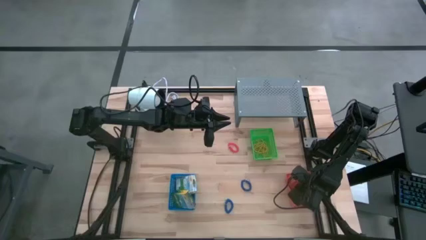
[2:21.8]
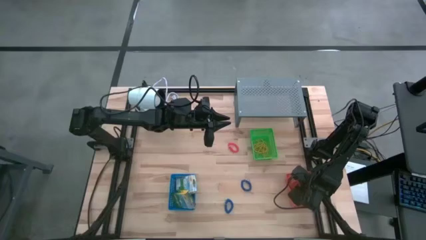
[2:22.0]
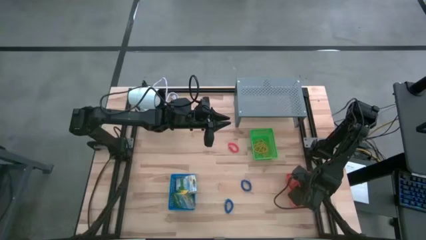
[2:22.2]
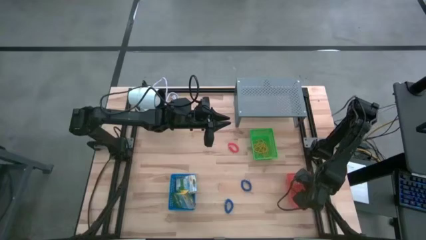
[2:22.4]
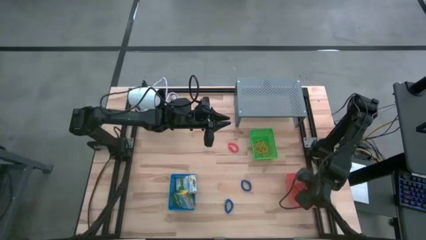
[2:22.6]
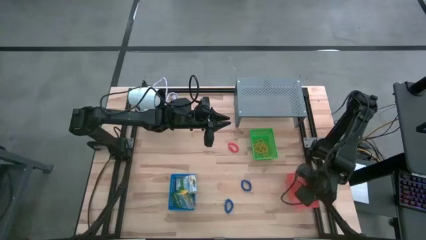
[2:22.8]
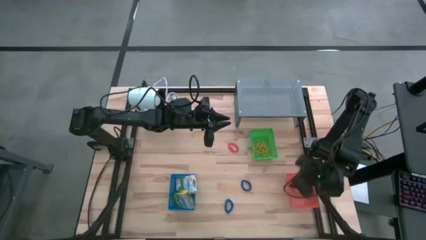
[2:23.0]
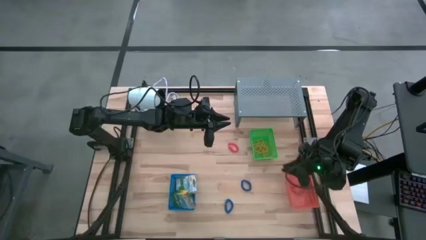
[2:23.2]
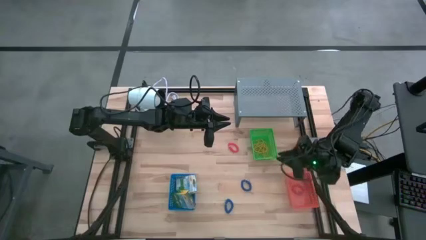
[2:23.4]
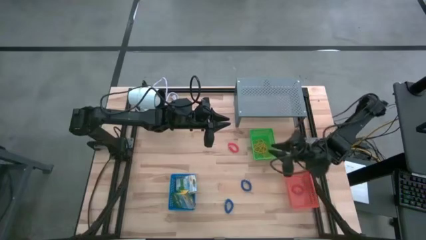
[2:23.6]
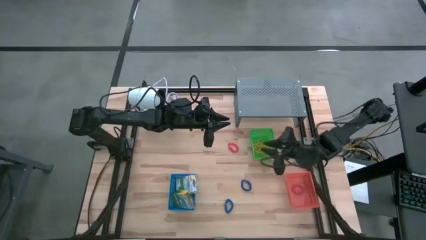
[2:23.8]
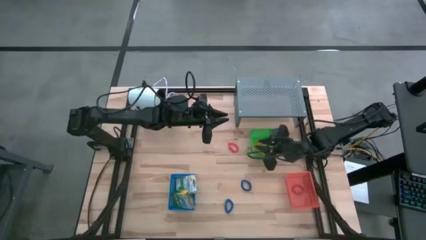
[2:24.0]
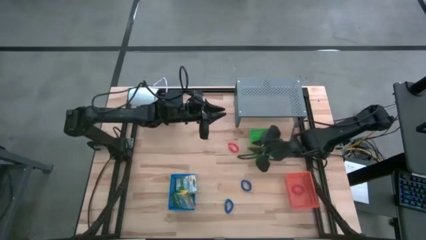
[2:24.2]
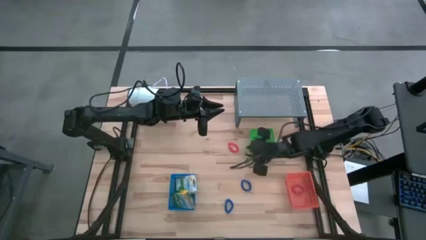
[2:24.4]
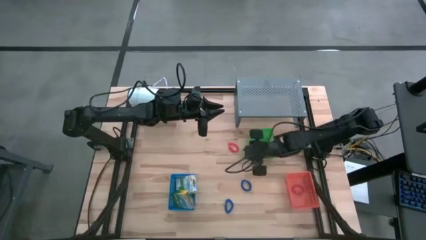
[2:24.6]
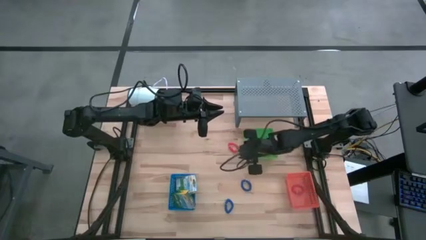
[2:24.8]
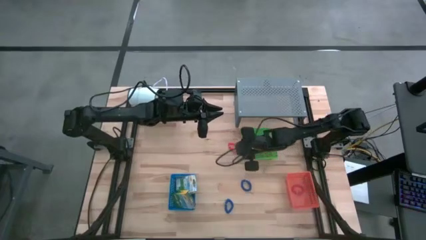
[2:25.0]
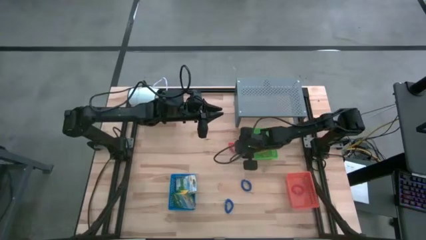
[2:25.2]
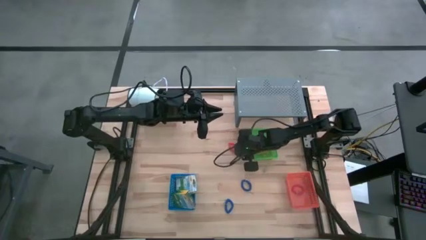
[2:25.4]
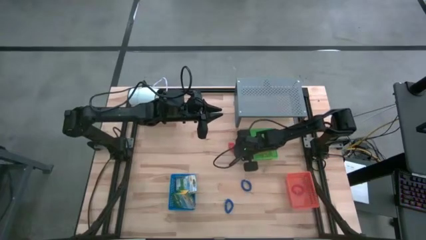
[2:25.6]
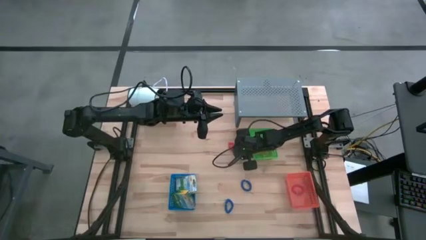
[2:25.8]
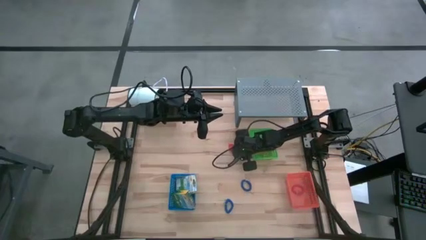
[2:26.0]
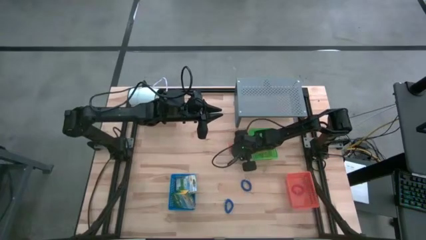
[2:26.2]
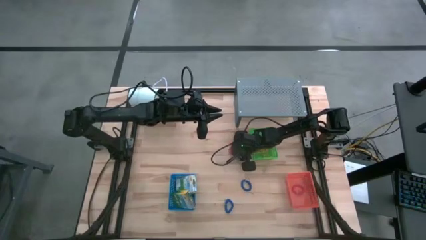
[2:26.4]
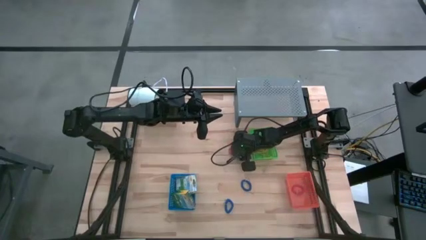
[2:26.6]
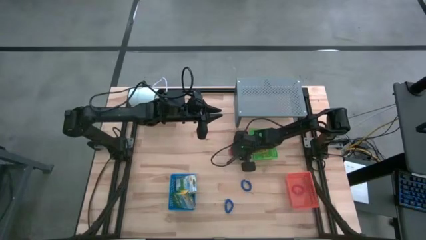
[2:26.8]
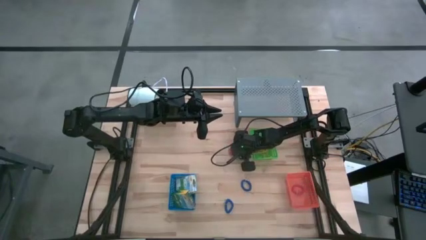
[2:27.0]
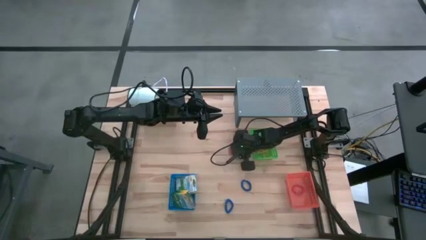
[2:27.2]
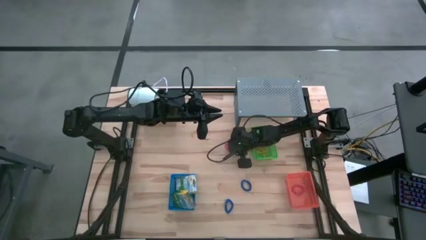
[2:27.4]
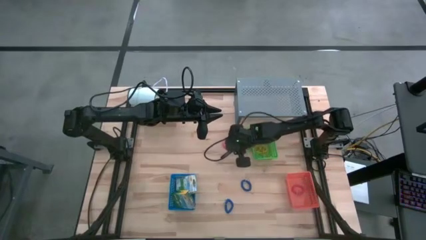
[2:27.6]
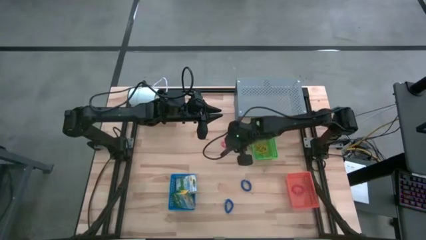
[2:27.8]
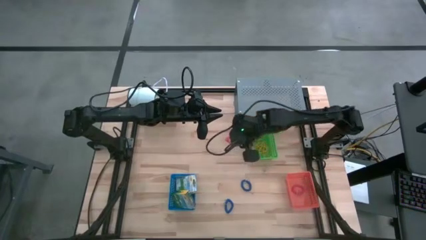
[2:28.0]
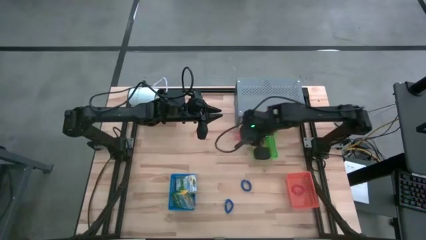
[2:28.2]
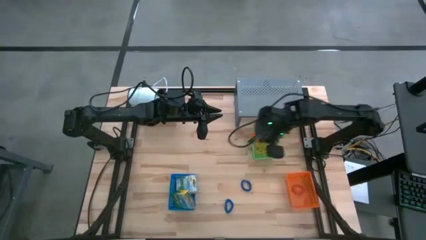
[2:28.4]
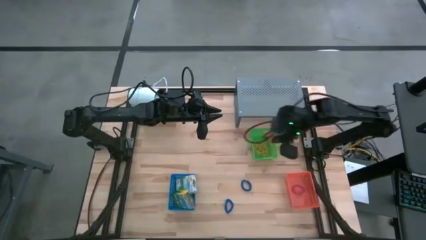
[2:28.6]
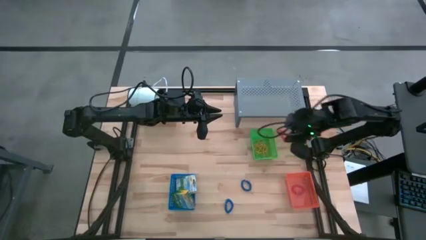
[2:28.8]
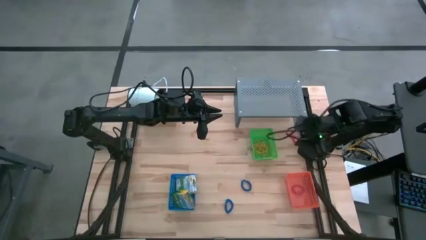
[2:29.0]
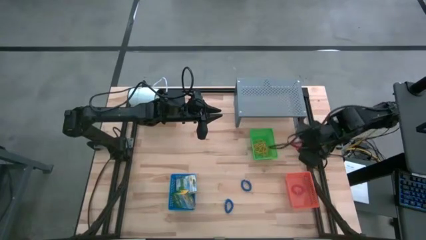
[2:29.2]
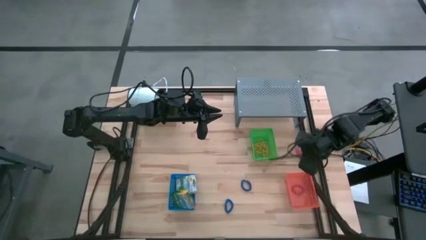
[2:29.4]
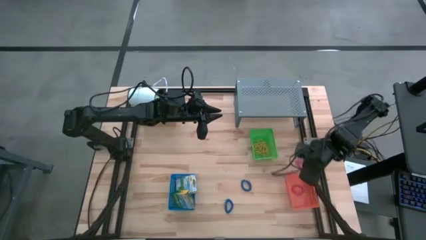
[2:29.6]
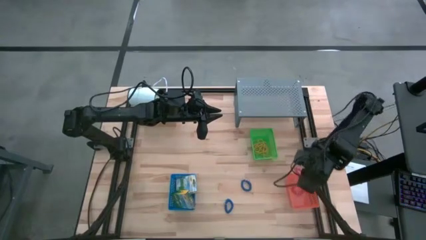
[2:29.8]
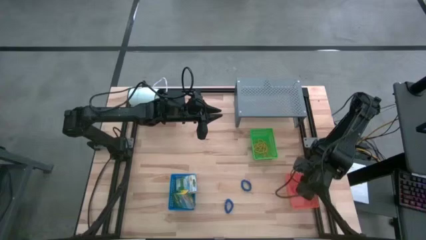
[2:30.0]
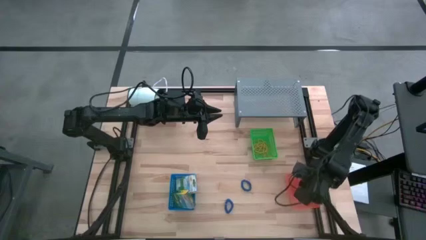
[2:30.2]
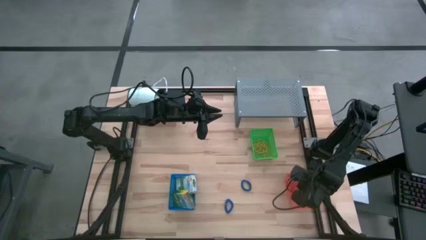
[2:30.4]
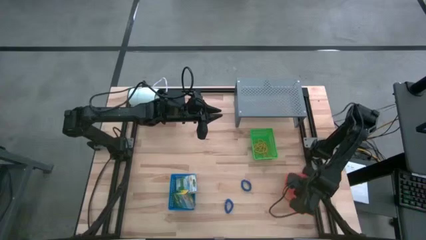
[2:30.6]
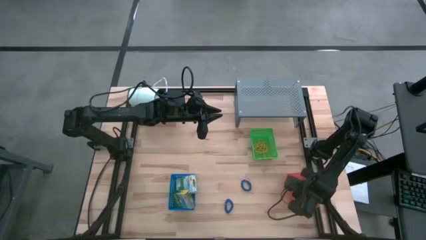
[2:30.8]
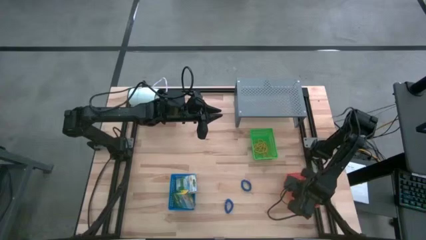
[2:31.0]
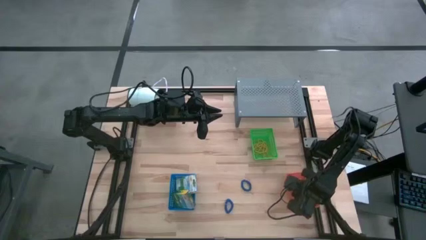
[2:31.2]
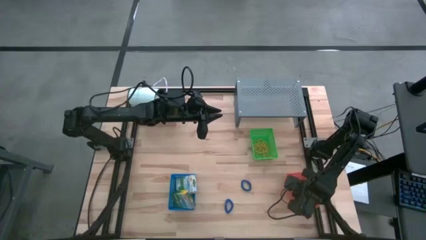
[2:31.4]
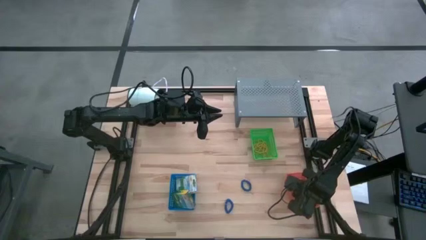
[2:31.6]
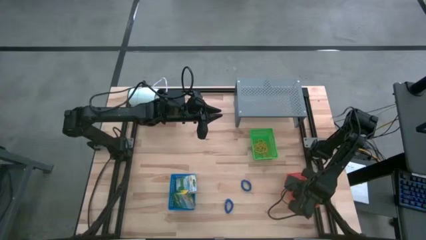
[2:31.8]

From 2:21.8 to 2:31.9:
Task: Pick & Place Office Desk Supplies
Put the orange spring keychain into the orange bin

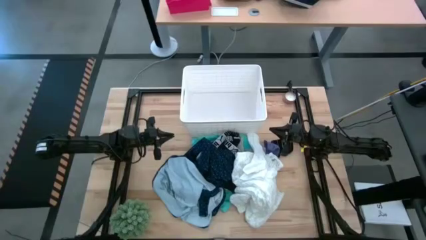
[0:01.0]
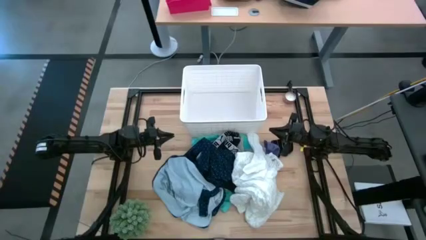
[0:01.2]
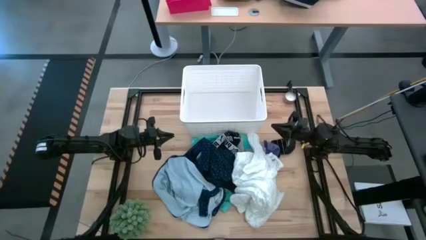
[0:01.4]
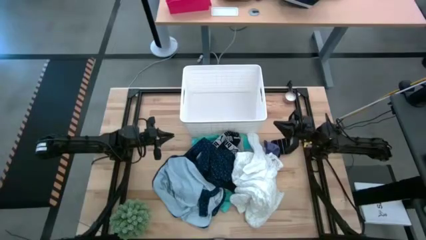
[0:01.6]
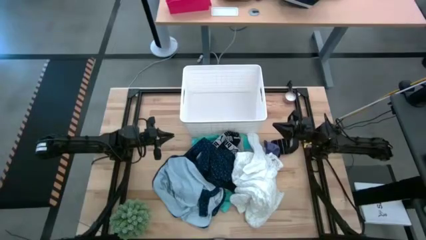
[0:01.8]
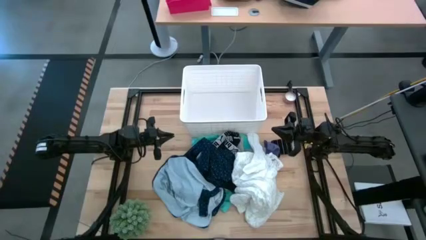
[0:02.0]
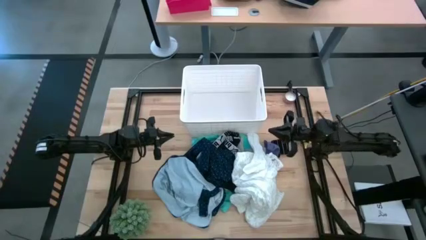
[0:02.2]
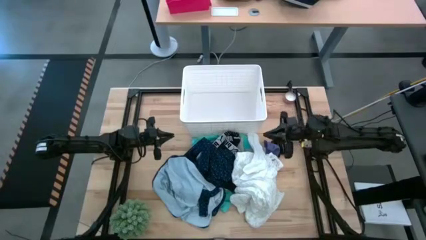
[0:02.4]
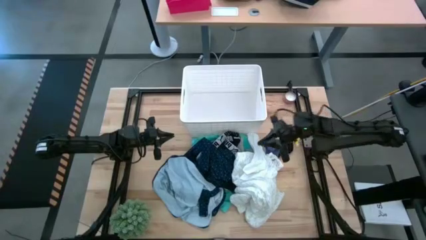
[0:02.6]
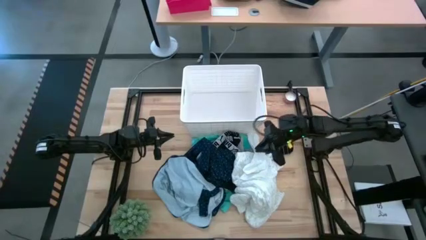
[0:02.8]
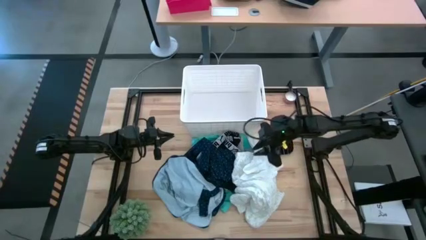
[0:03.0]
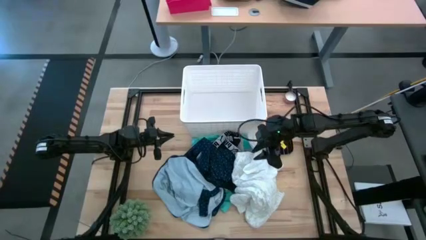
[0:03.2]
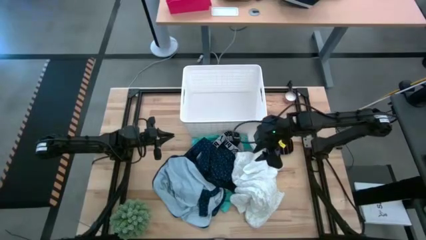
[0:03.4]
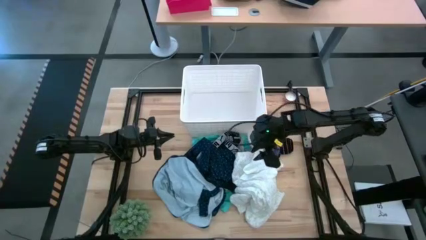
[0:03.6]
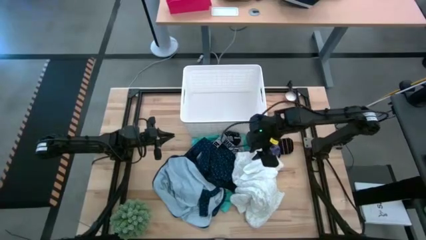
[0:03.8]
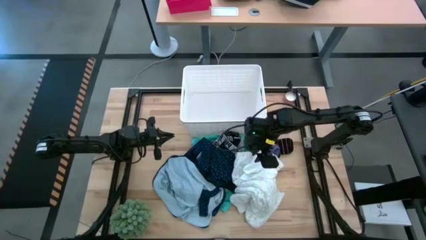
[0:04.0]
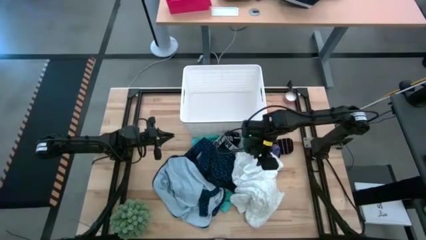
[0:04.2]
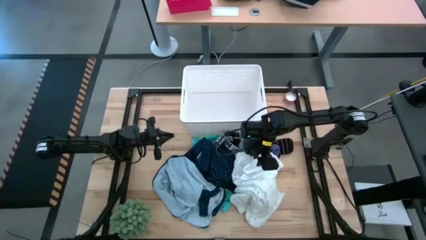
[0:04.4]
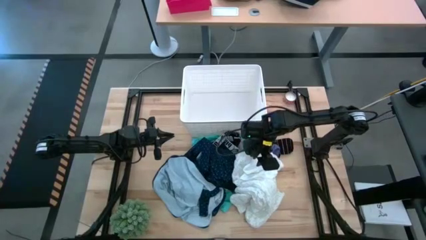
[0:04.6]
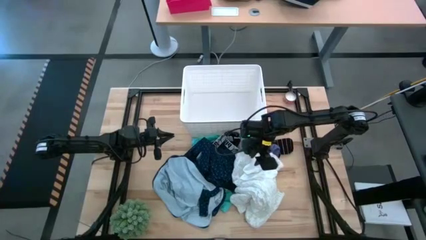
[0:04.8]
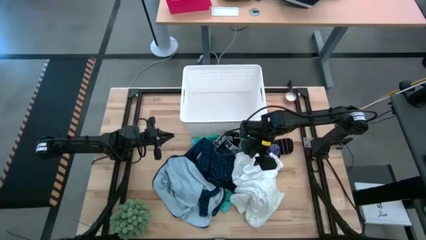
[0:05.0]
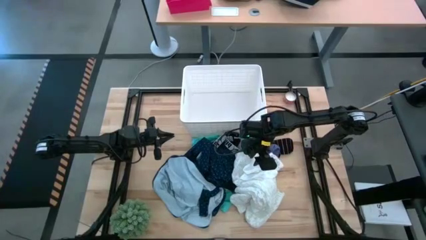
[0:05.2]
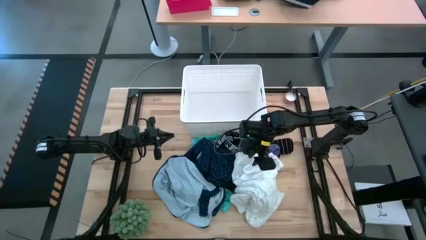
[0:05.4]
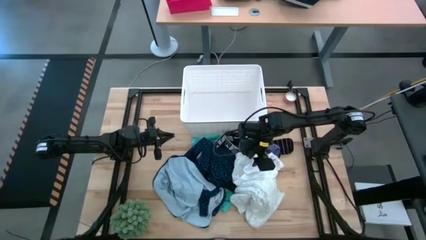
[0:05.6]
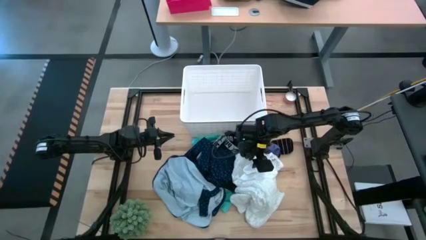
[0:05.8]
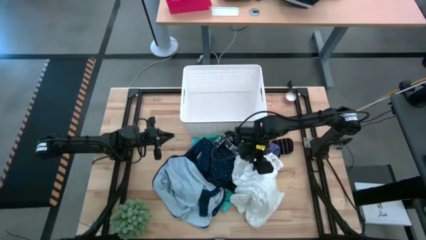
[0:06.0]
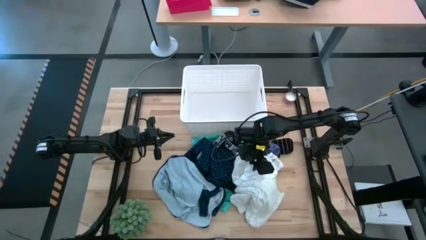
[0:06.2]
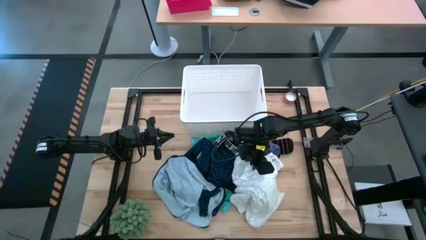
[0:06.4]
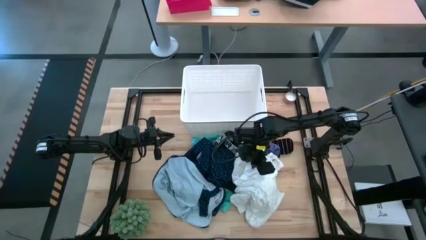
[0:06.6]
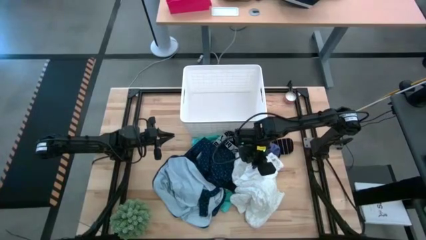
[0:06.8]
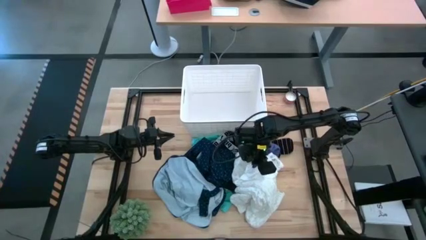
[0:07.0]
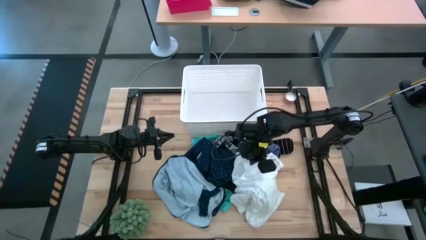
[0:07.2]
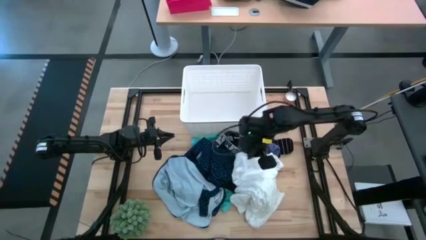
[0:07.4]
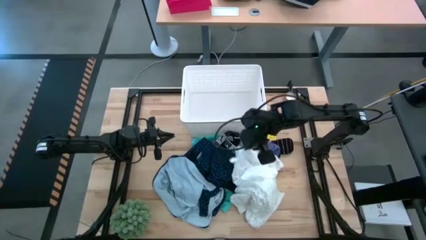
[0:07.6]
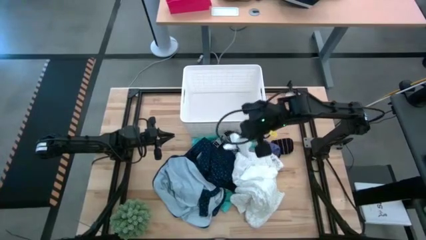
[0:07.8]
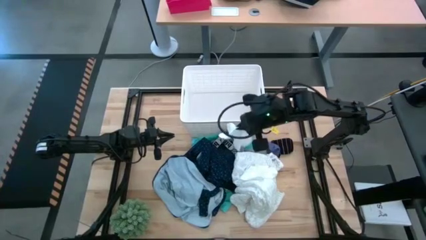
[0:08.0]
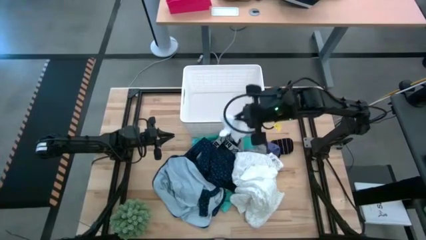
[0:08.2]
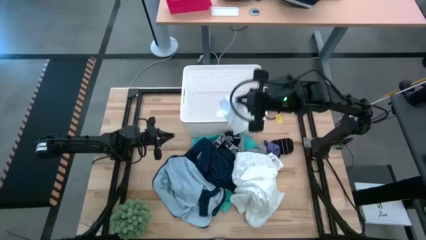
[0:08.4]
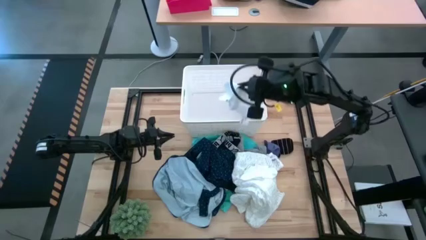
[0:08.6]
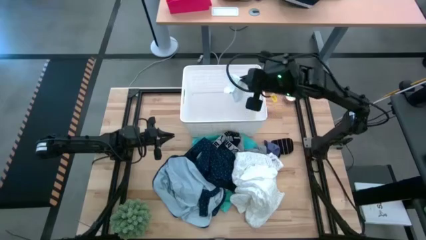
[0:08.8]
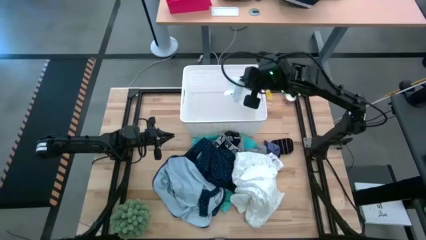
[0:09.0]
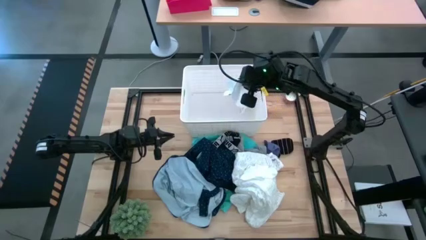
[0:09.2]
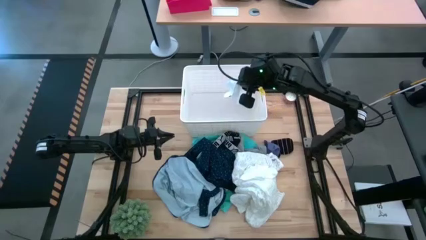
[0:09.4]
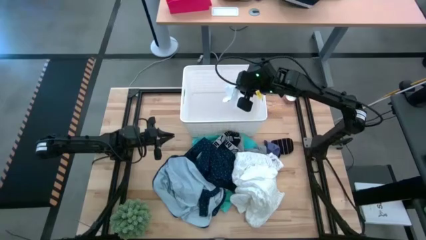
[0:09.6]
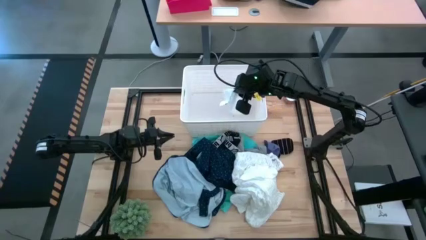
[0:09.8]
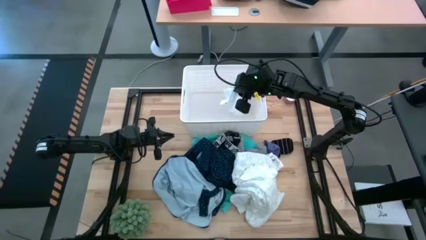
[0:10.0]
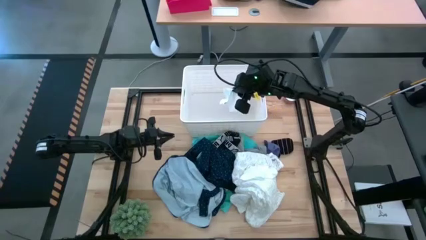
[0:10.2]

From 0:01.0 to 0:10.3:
Task: Sort clothes
Put the white socks into the white bin
